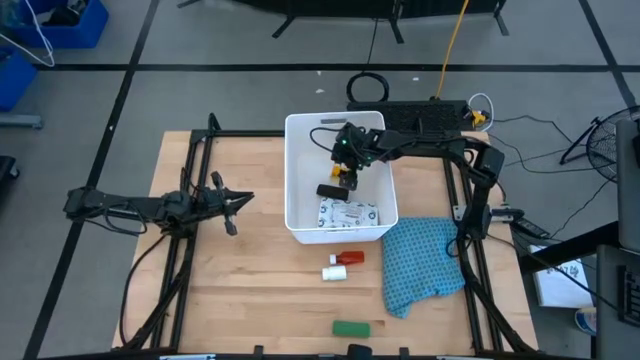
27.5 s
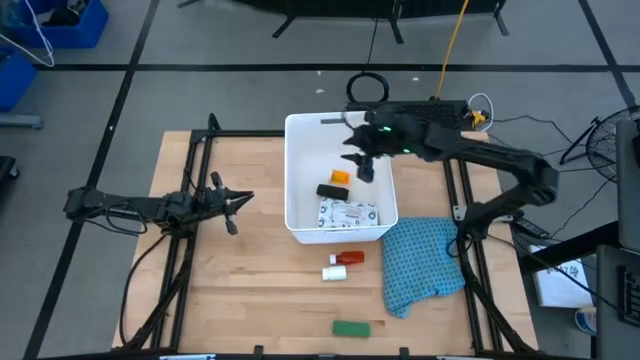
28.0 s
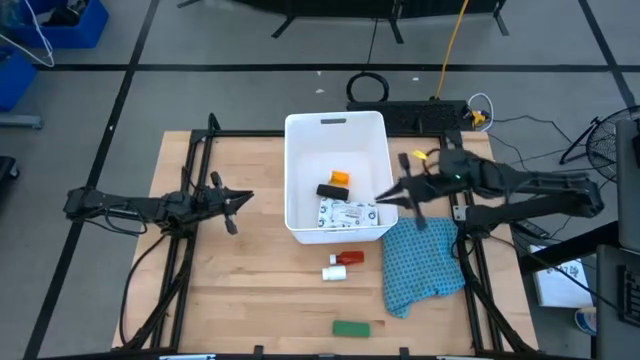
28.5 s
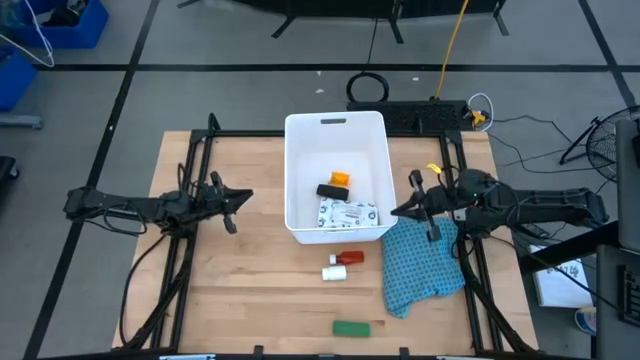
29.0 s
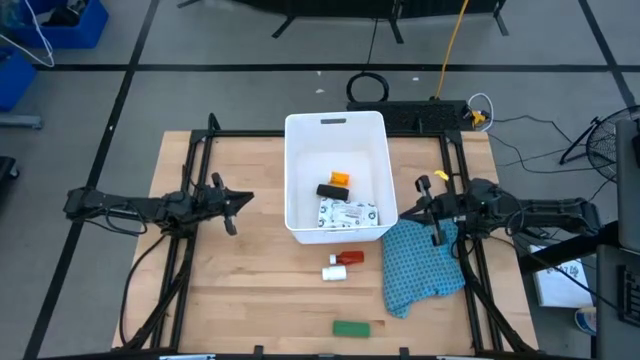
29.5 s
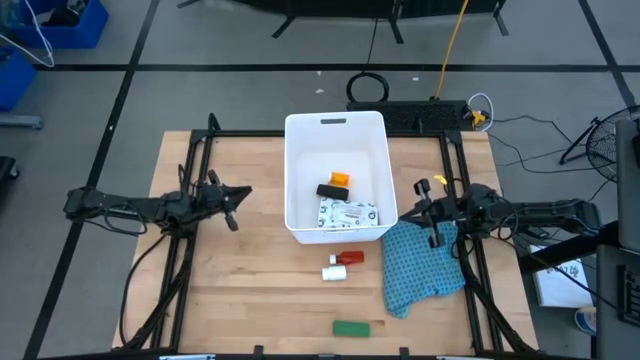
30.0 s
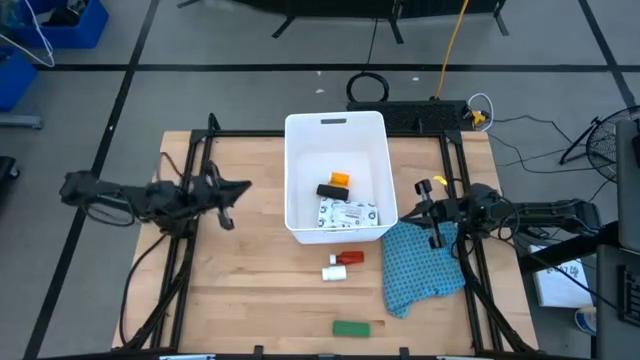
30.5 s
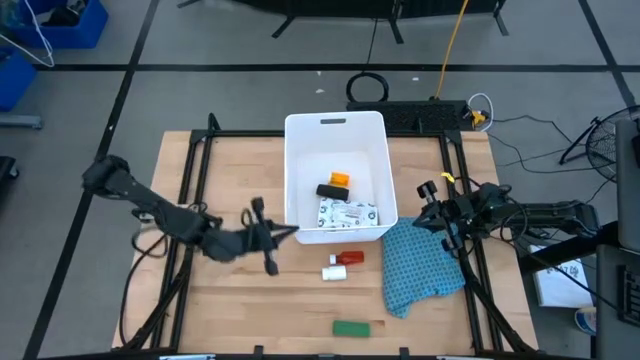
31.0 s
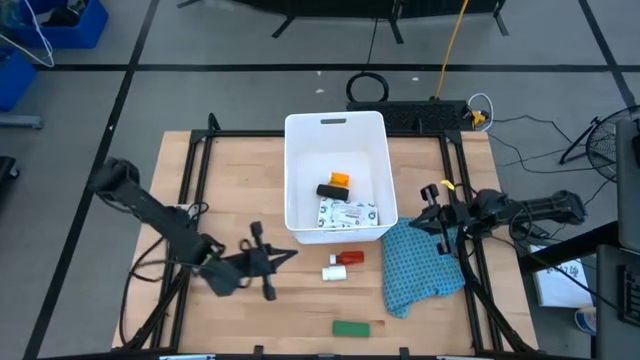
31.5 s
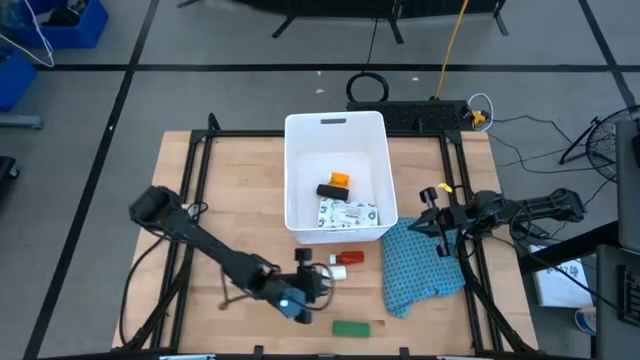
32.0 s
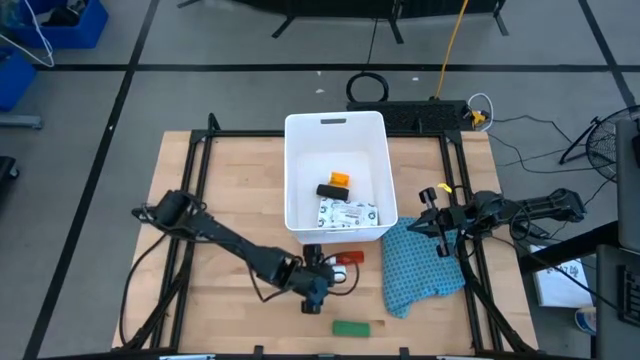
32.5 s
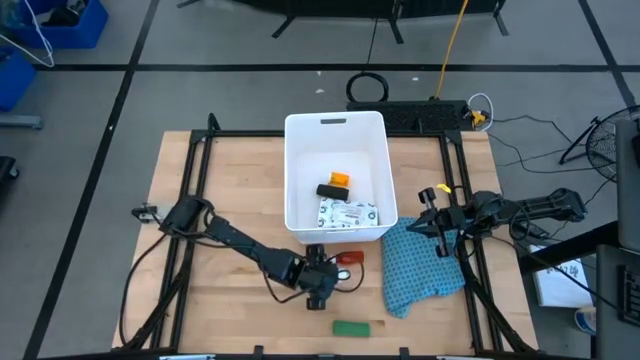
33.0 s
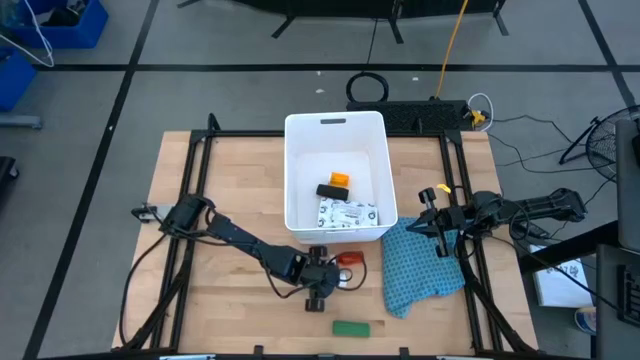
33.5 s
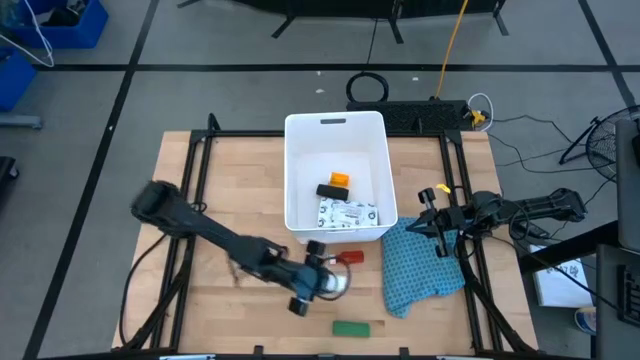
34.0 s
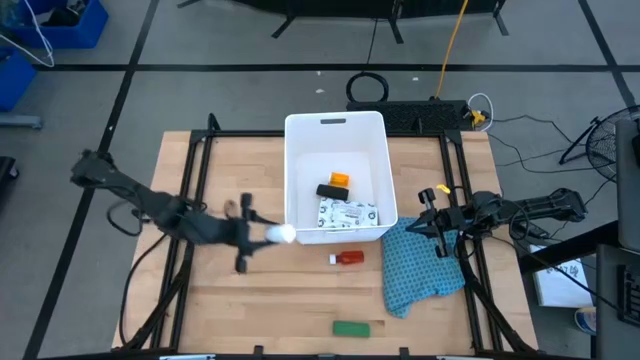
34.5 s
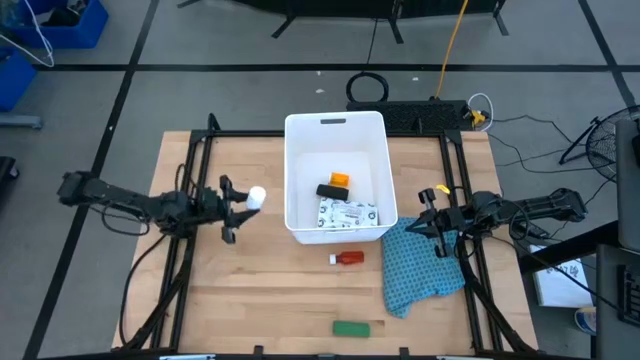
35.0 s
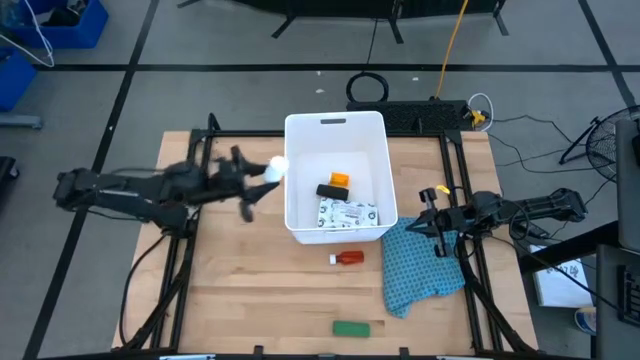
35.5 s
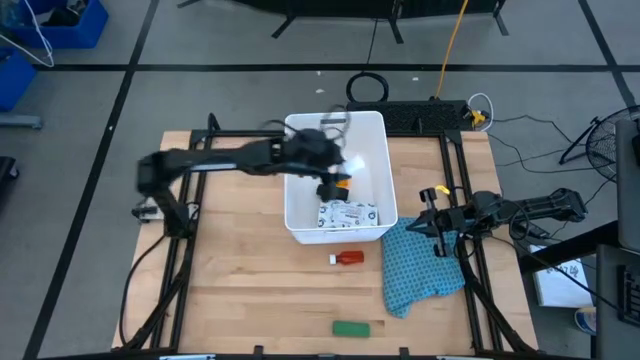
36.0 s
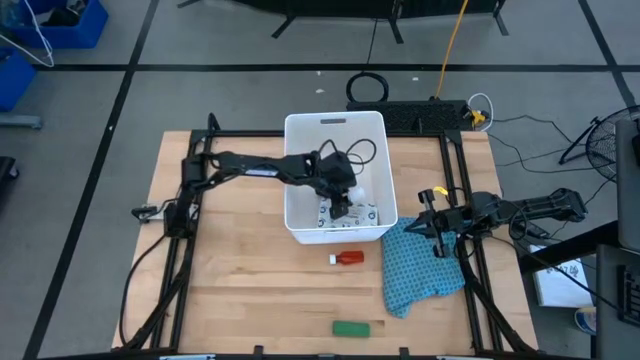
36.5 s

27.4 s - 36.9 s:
Task: Pick & place medical supplies in basket/bin
Put the white pill bottle into the white bin

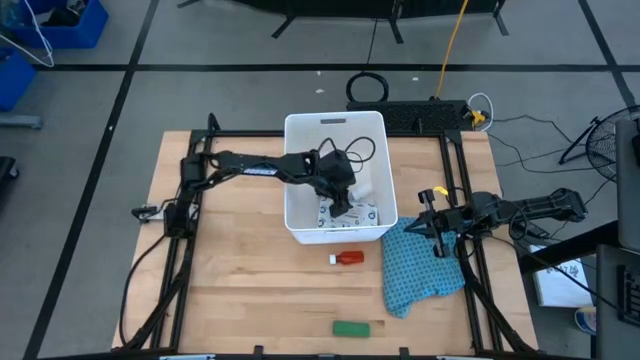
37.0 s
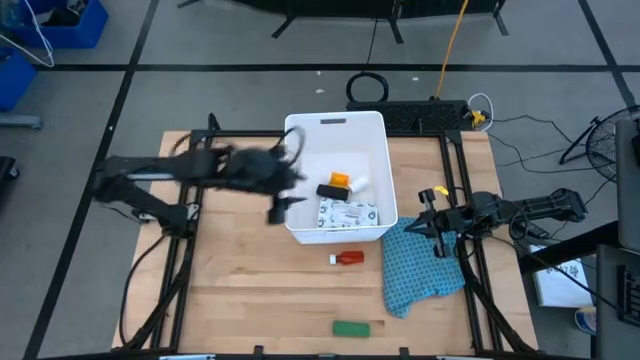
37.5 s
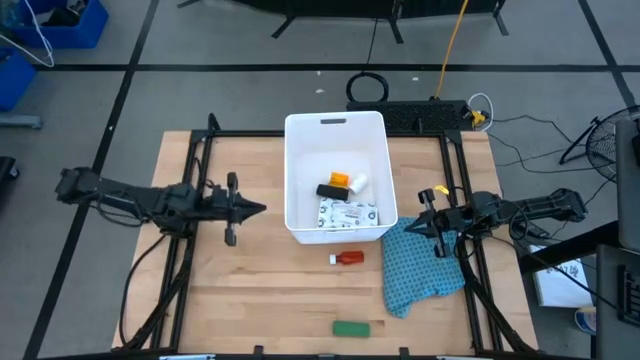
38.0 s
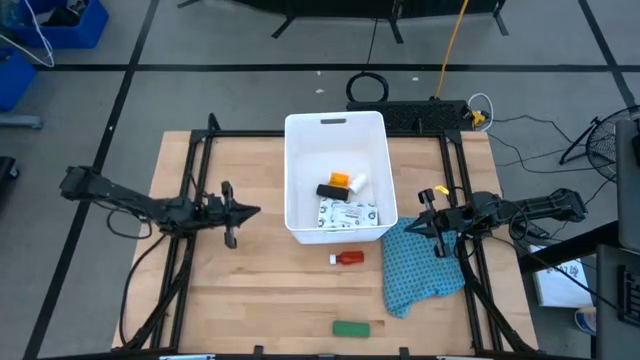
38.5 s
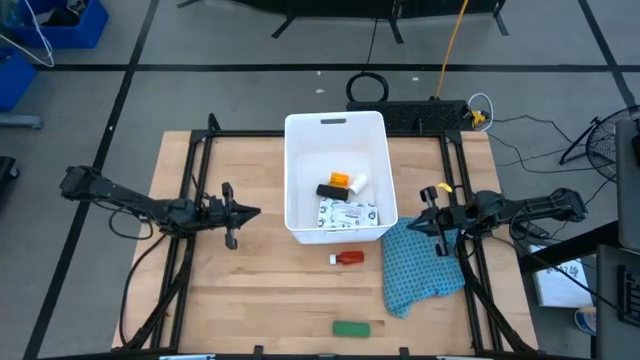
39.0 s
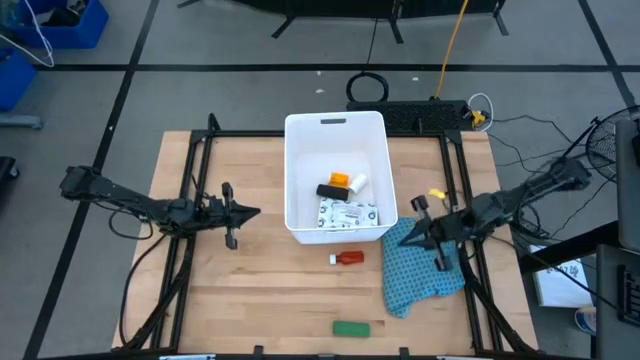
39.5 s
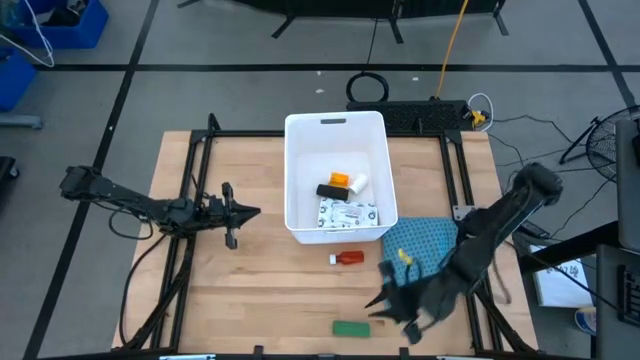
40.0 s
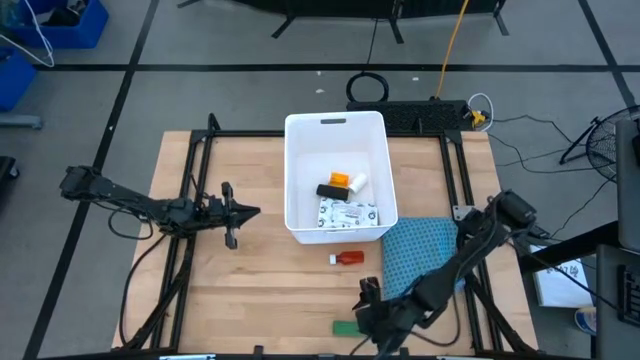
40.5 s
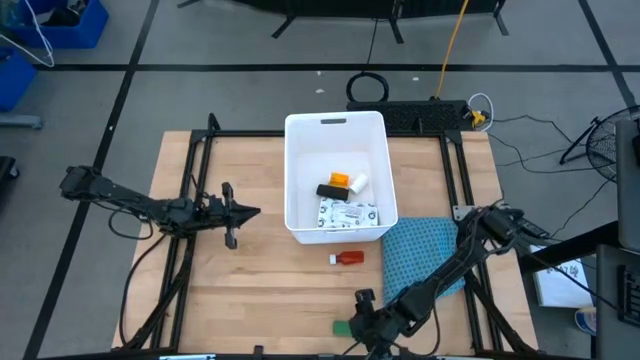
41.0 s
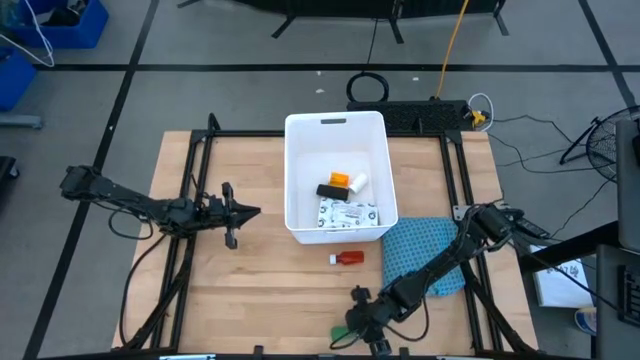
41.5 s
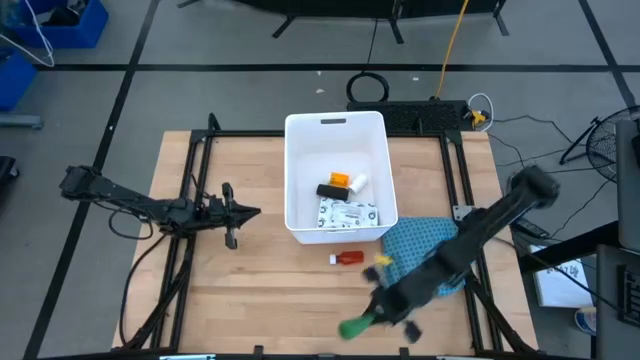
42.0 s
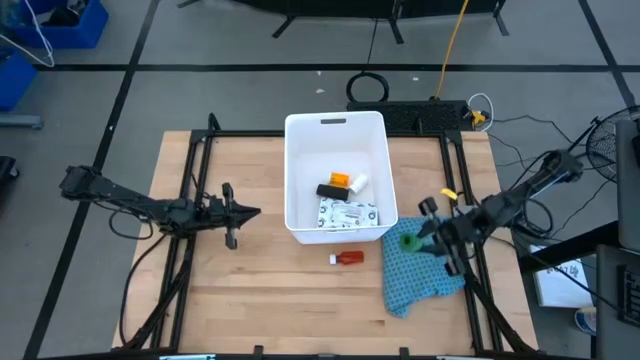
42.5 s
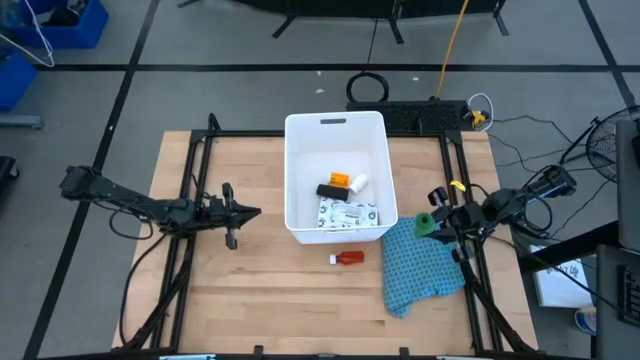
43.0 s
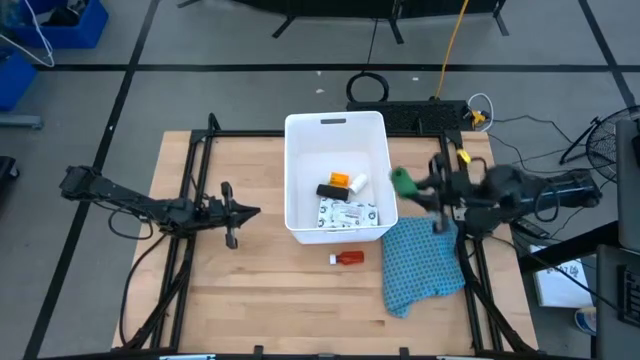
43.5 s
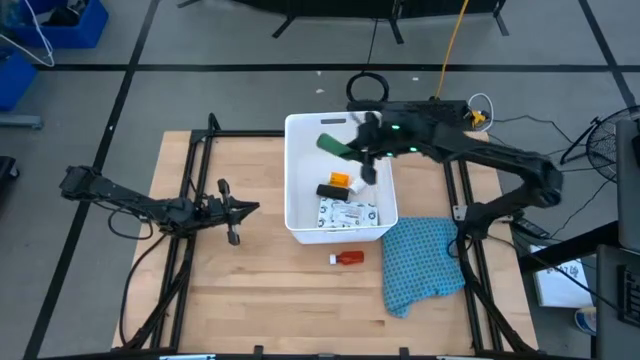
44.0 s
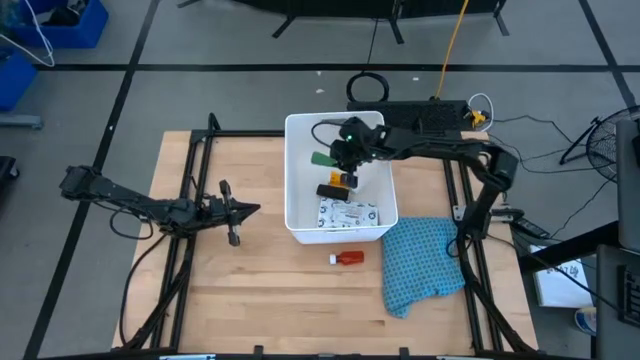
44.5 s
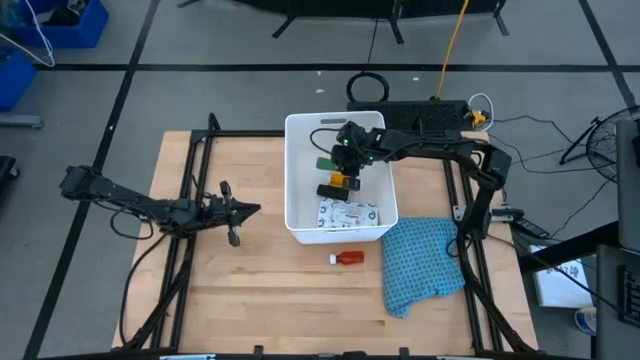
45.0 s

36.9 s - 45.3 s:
Put the green bandage into the white bin

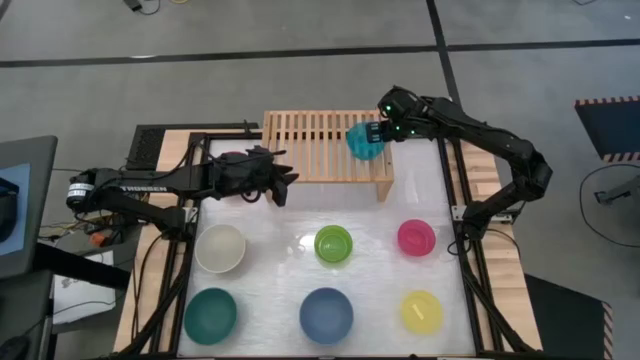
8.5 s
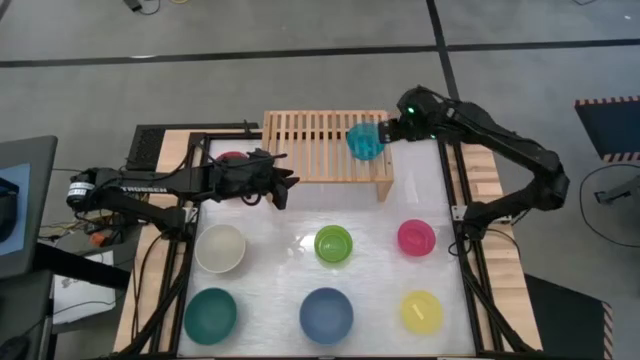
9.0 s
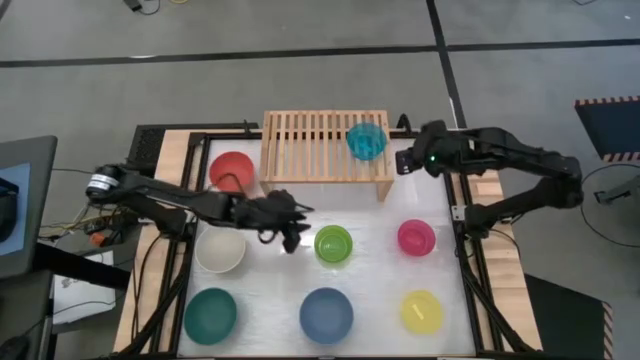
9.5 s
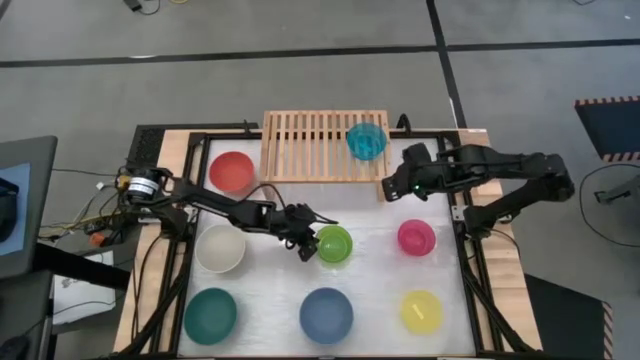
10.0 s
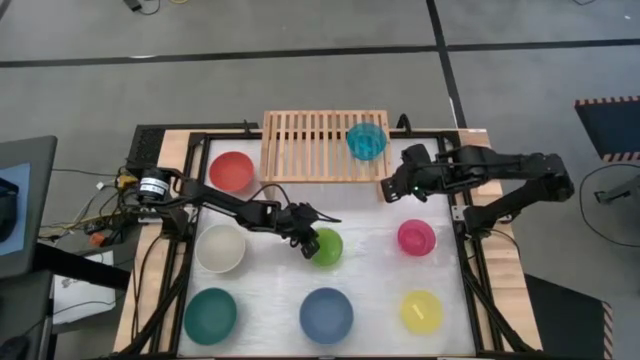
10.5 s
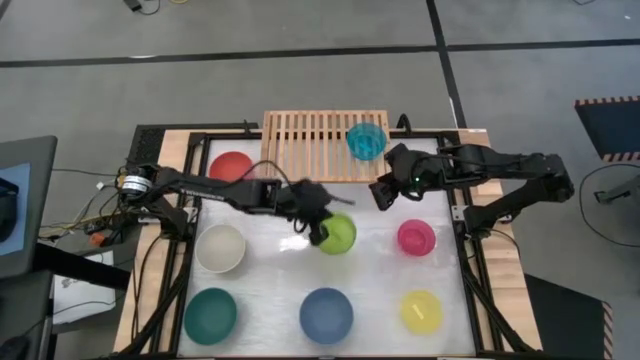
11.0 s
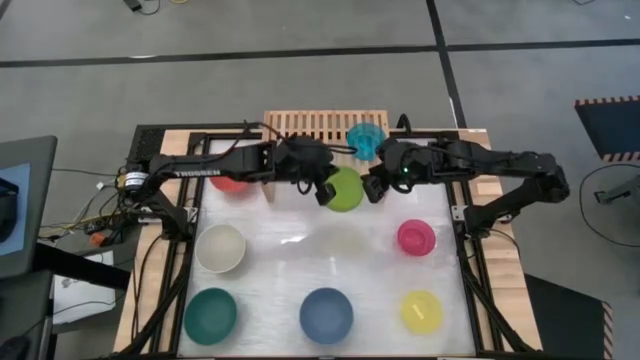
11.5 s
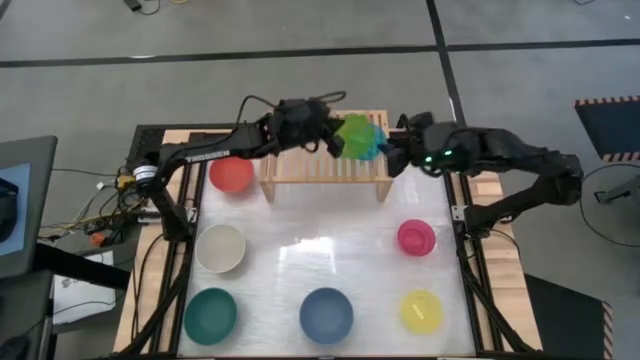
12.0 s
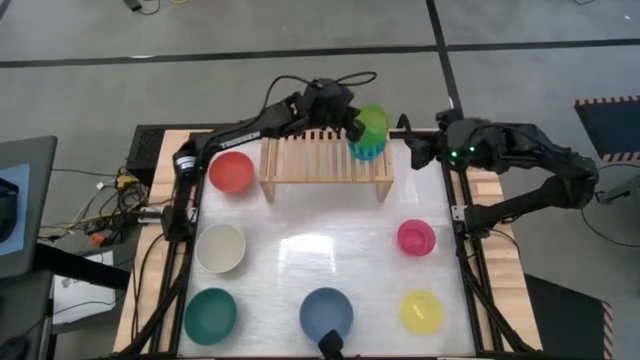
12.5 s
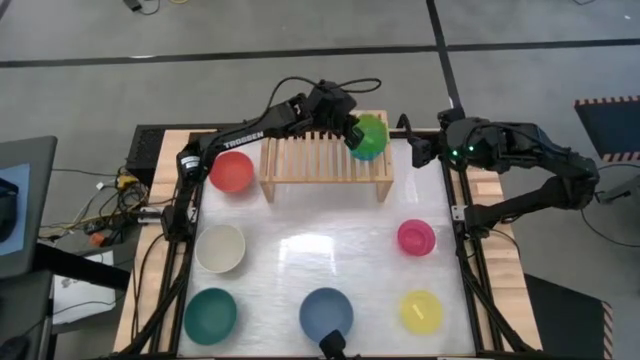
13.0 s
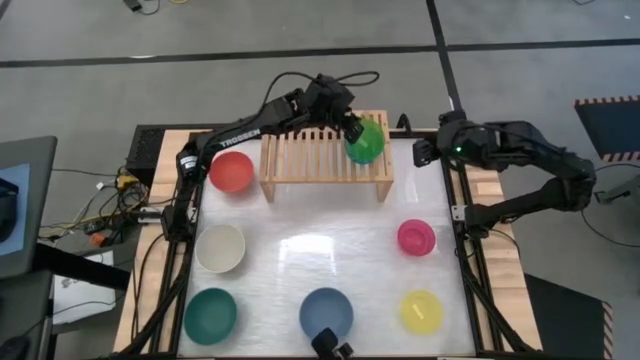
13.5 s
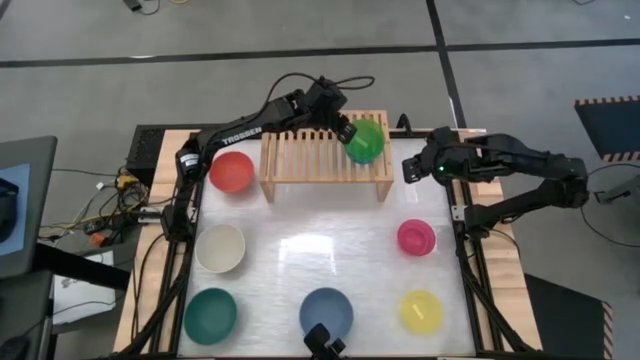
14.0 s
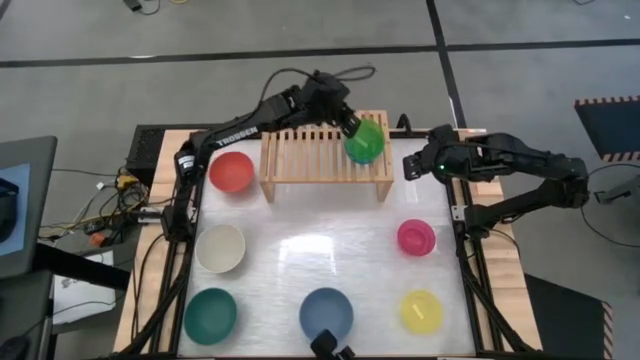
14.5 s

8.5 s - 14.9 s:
Task: Place and stack bowls onto a shelf
Stack the small green transparent bowl on top of the small blue transparent bowl on the shelf
